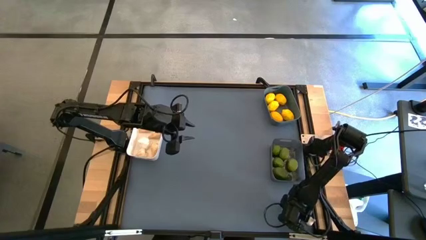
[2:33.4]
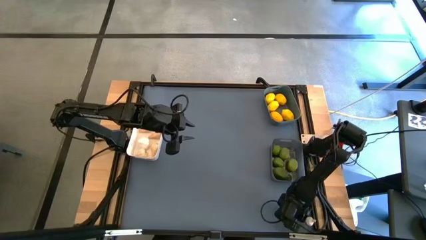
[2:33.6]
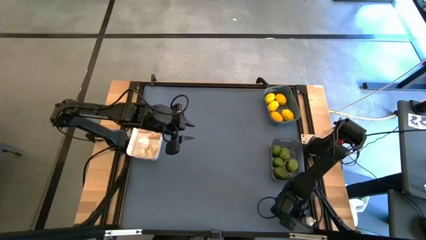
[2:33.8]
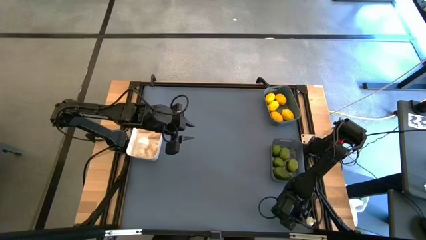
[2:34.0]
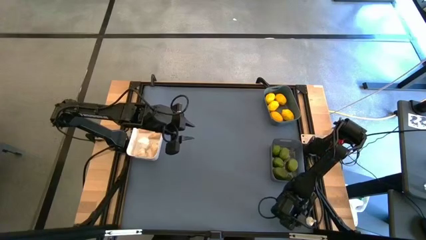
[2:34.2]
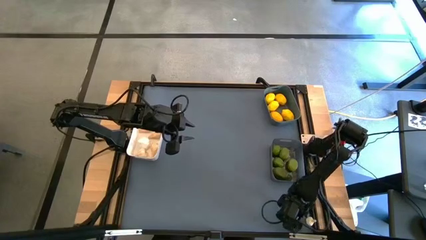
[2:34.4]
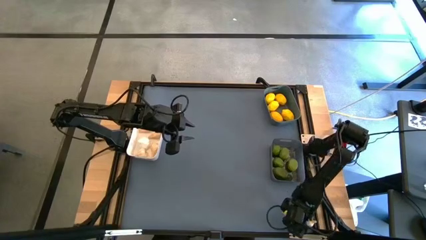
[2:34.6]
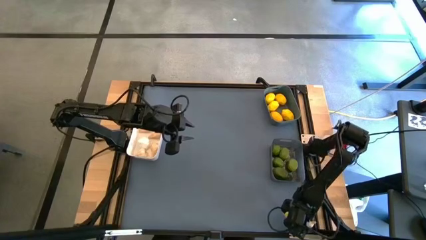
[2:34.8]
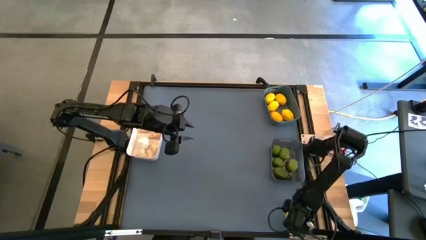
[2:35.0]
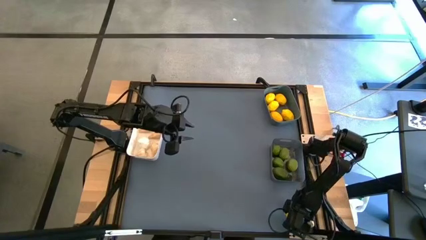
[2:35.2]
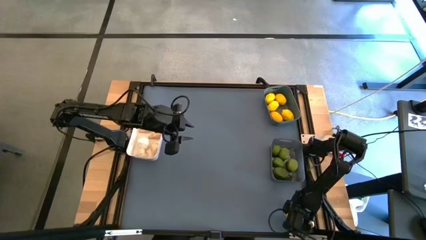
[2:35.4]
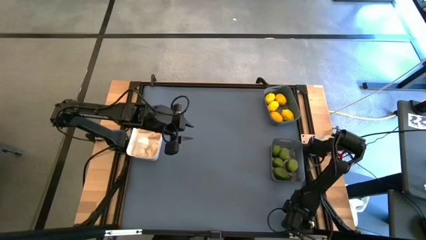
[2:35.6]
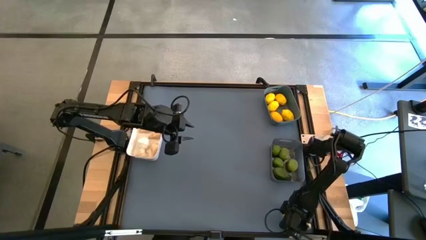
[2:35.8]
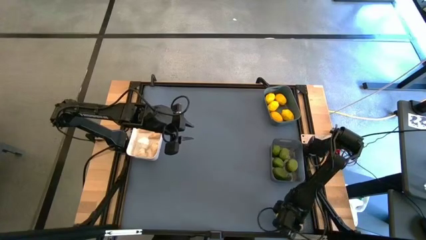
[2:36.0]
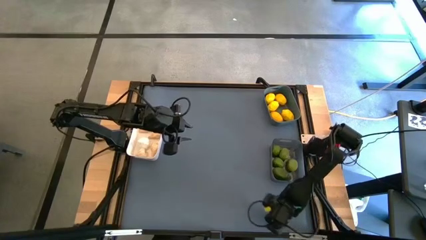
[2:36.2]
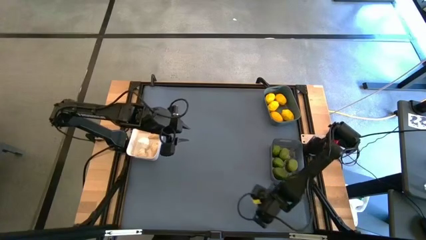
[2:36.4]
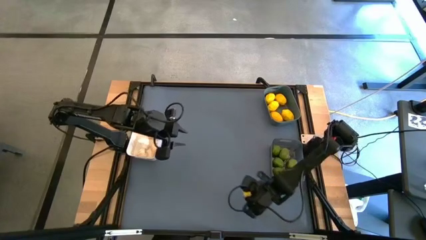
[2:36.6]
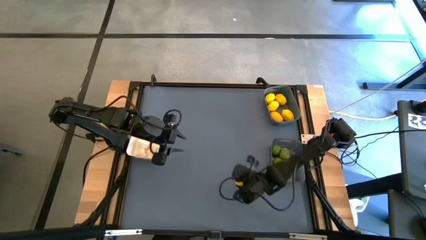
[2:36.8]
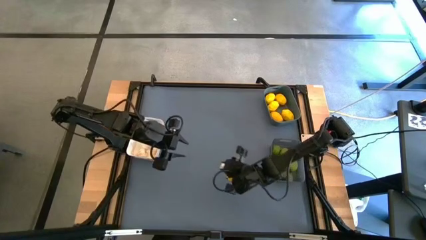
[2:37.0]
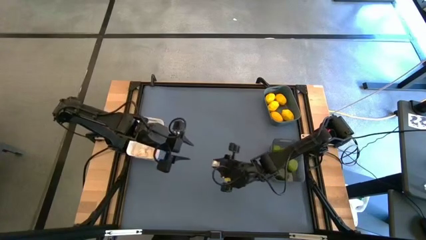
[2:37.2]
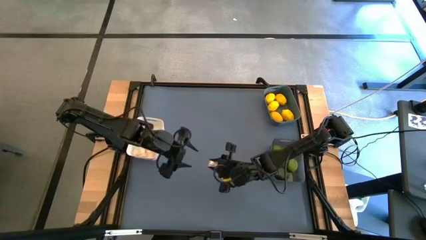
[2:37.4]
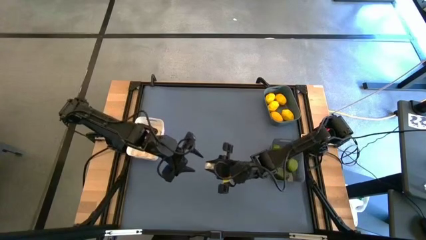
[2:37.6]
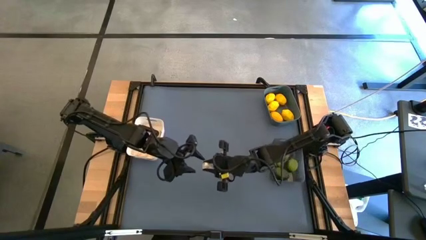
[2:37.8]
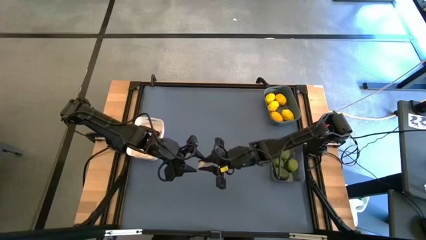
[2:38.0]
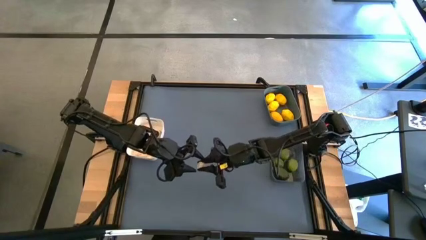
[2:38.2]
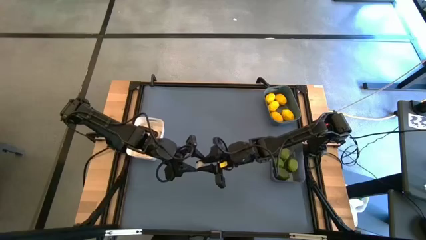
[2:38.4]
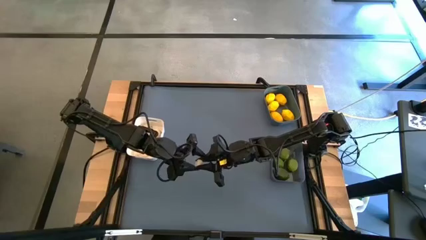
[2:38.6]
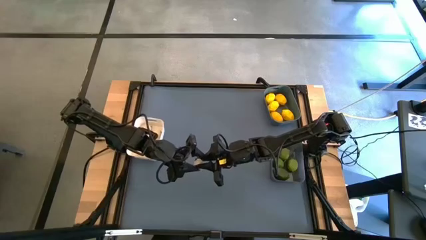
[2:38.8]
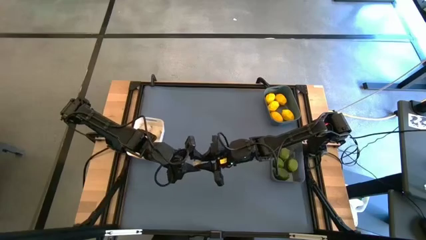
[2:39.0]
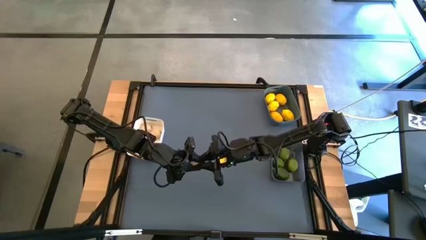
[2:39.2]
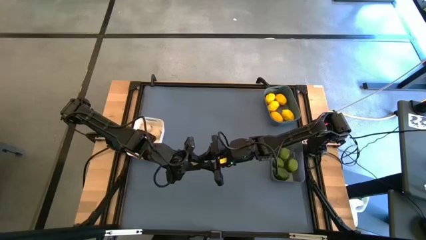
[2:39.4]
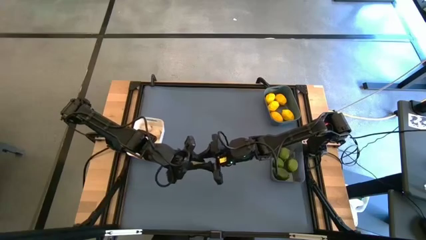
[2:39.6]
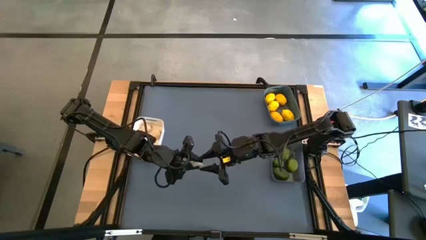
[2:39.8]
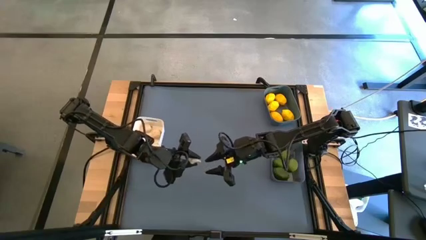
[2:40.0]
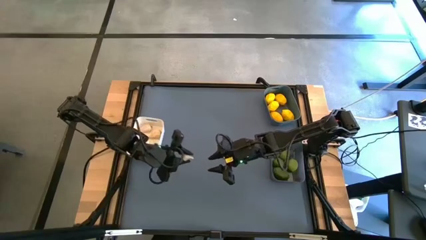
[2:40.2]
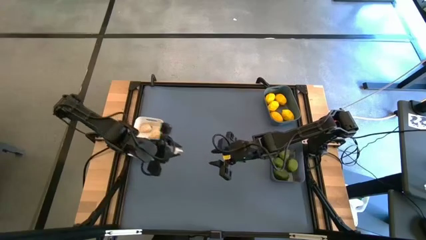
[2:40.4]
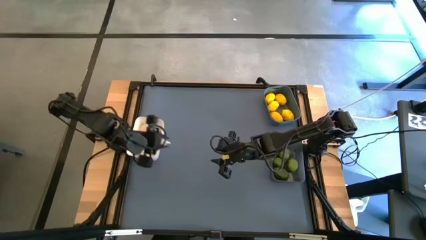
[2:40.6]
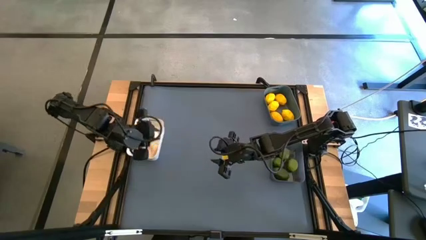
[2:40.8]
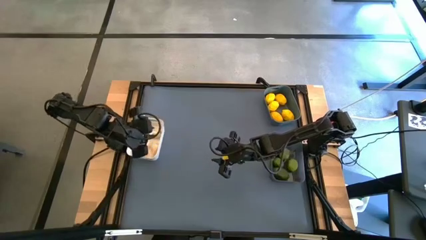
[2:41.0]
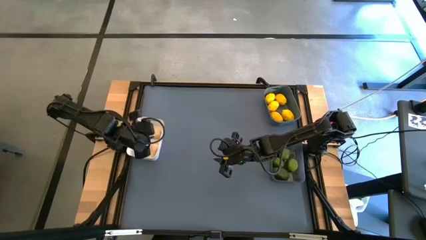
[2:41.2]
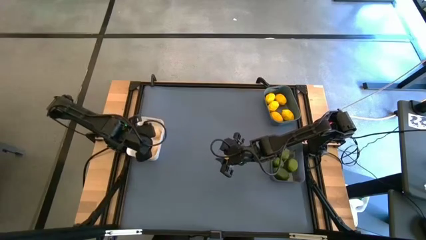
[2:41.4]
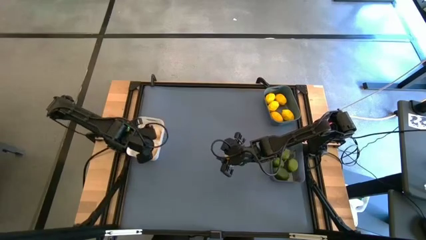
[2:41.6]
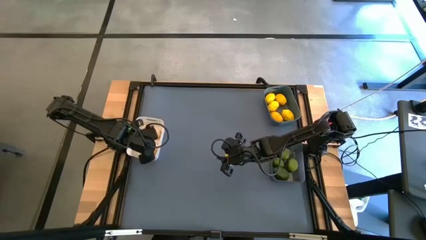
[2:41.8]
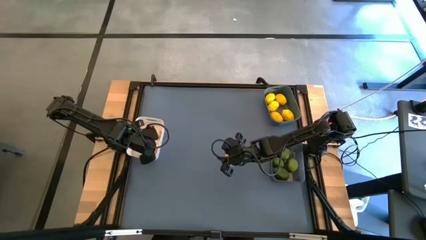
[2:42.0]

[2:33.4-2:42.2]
Task: Sort produce into baskets
Put the garlic into the white bin

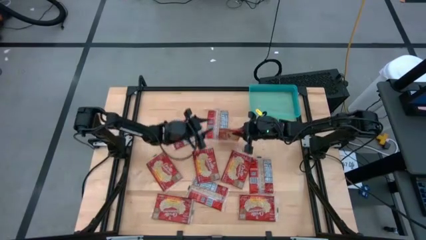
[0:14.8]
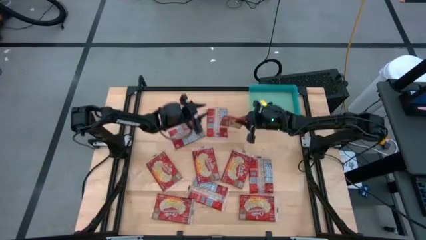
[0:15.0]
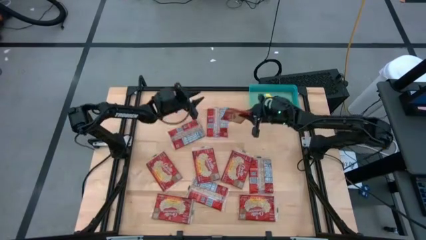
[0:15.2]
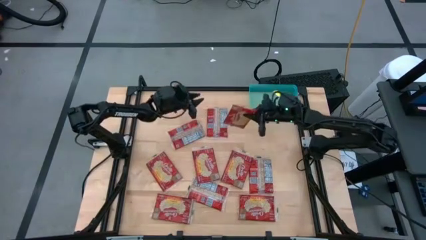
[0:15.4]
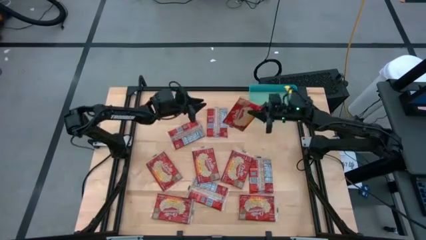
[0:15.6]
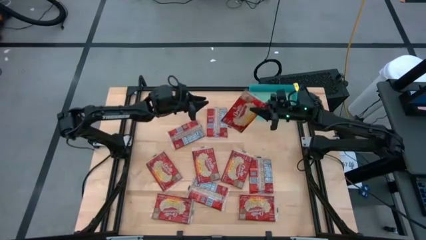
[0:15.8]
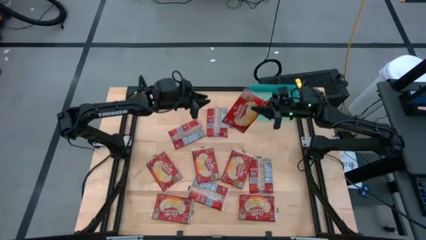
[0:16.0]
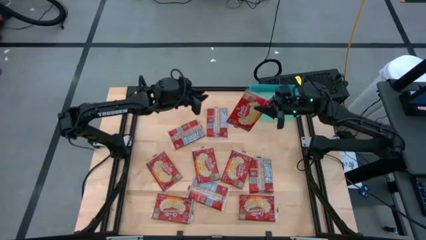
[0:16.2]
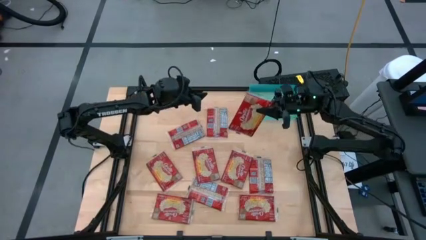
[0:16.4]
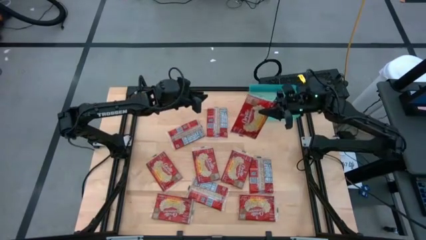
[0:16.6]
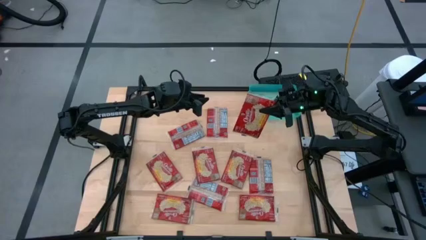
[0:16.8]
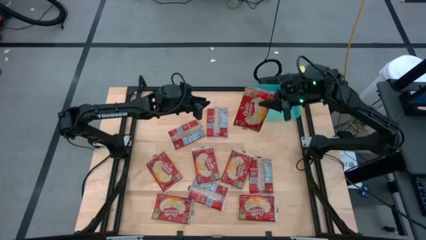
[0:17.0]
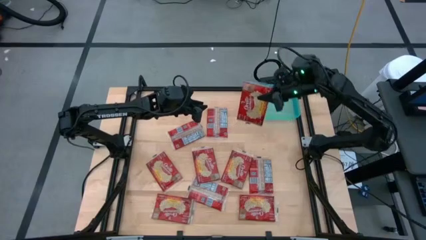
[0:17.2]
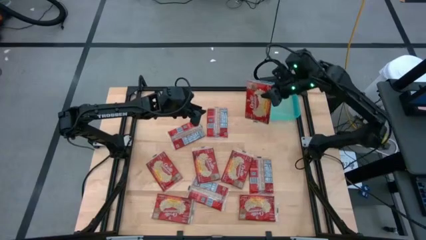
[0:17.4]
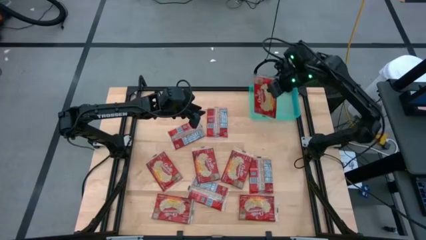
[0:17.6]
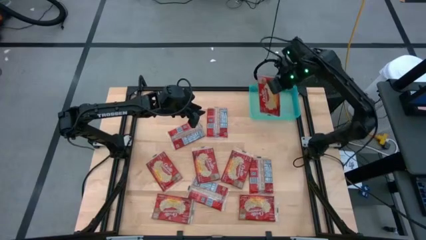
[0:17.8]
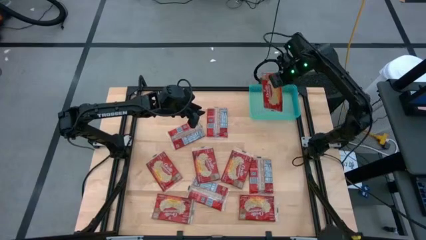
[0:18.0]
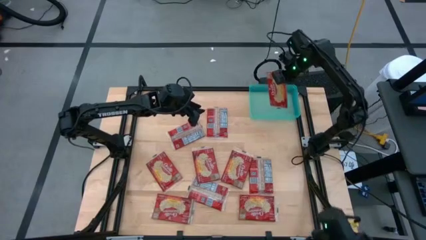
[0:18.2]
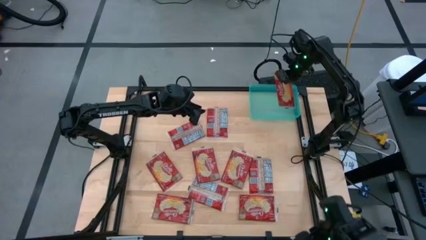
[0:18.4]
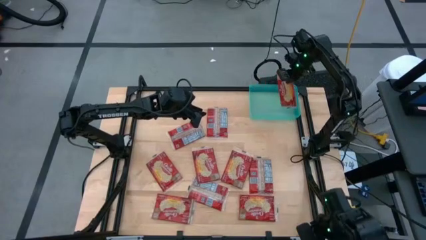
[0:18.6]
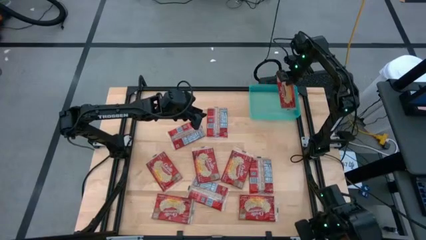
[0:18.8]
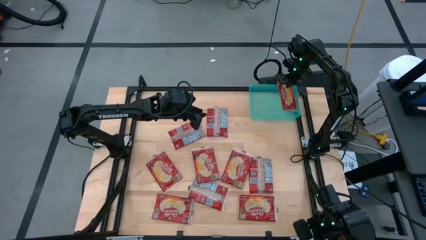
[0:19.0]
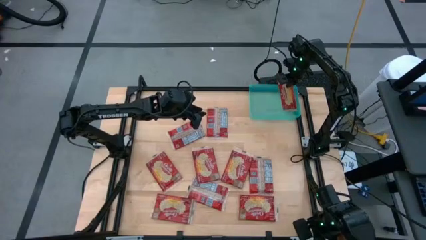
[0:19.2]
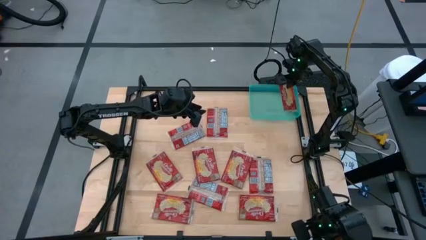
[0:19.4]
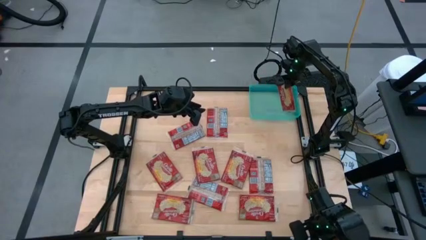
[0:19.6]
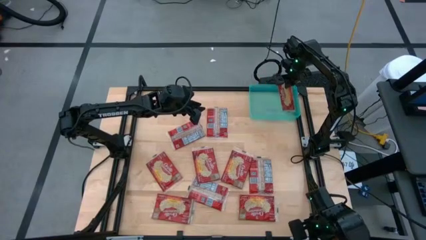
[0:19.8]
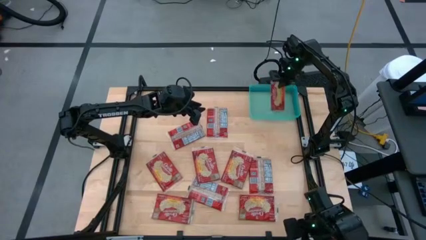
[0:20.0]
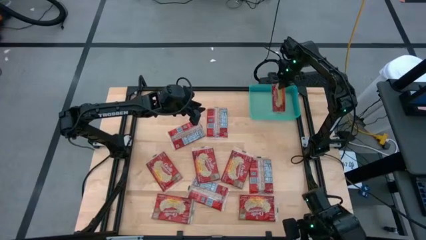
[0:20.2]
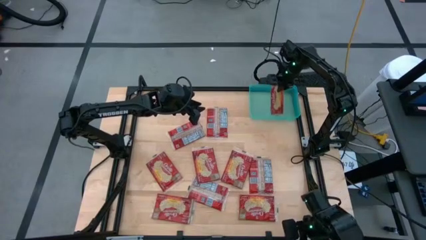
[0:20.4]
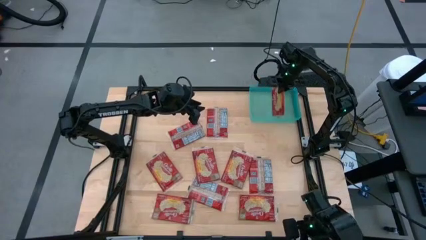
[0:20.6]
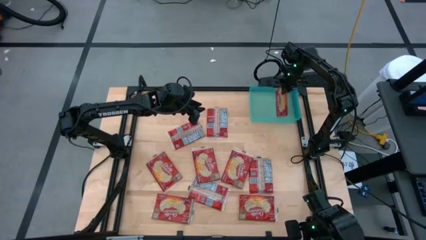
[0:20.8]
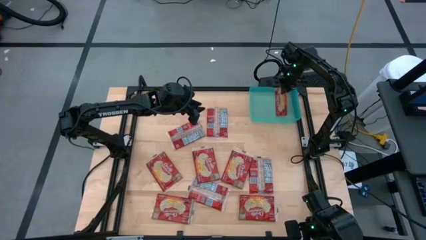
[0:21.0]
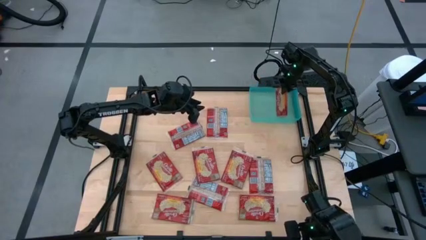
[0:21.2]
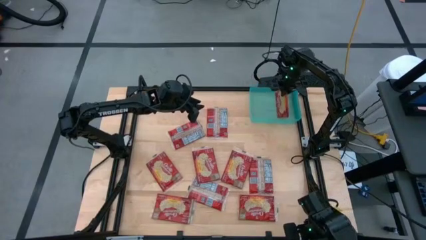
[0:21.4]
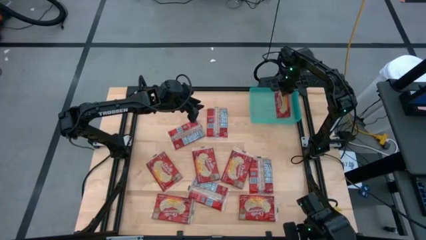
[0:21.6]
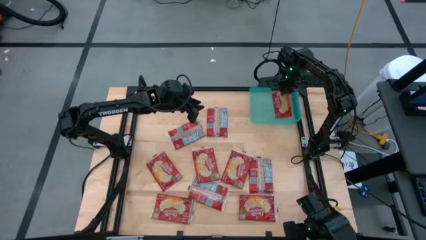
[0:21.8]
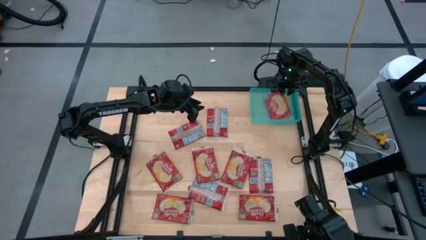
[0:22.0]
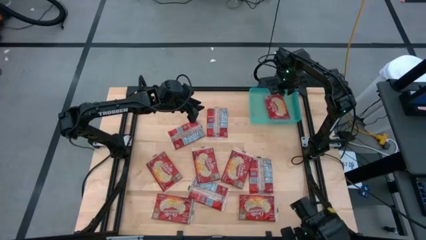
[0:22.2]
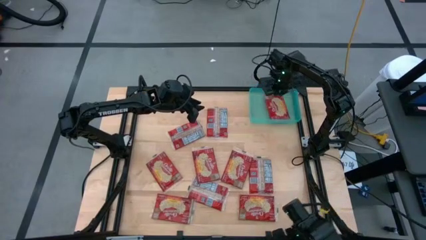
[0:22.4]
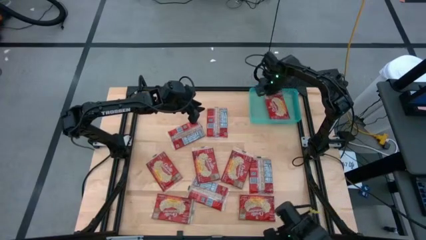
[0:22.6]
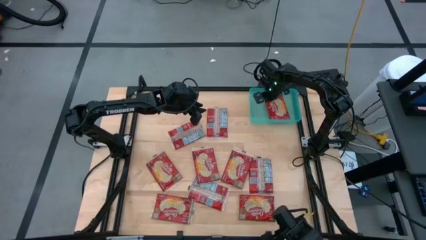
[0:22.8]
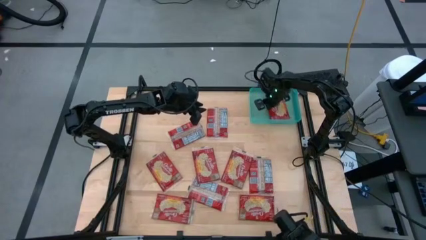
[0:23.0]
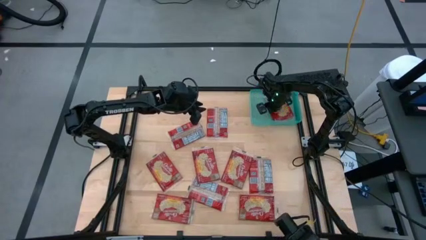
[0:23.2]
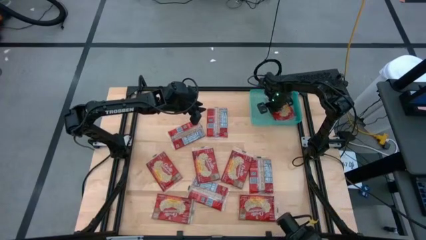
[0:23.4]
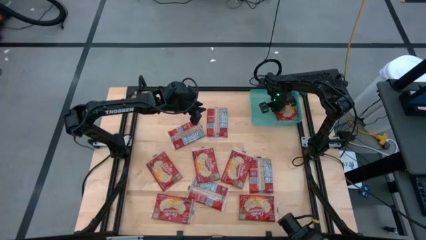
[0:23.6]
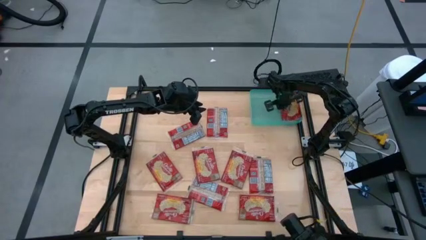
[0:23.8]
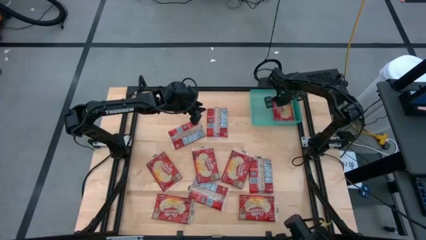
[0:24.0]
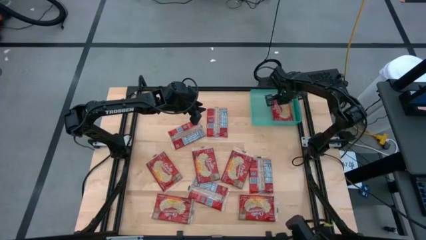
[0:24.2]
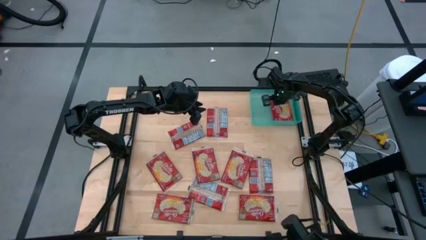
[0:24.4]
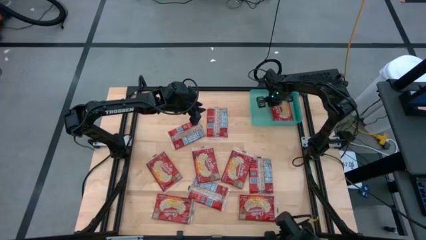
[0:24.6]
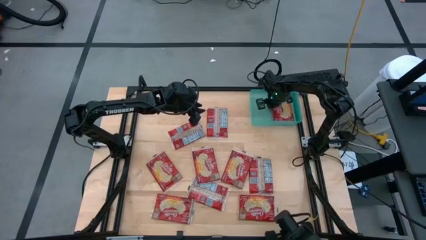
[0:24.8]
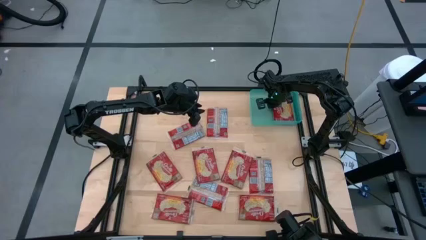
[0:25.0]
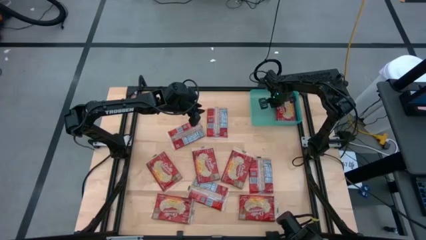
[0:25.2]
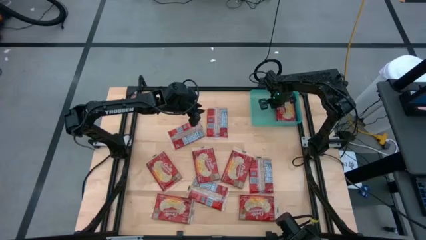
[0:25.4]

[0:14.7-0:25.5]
Task: Sort popcorn bags into baskets
Put the red popcorn bag into the light blue bin
